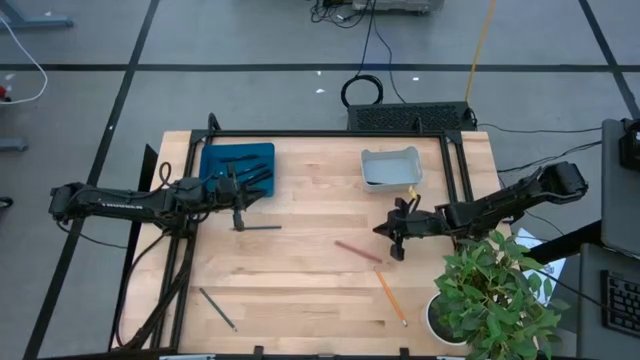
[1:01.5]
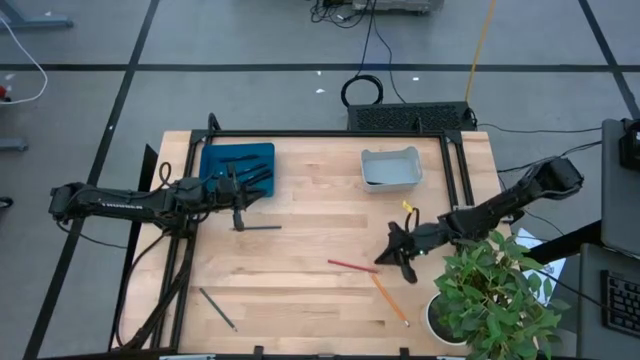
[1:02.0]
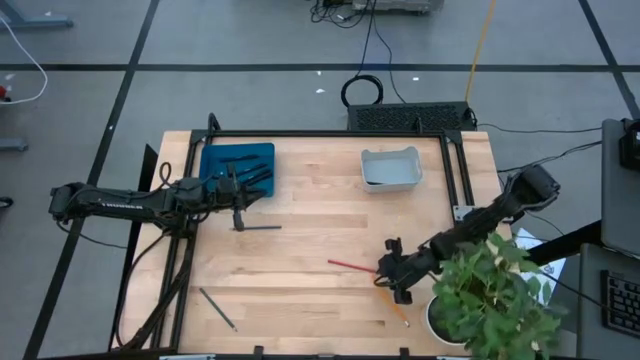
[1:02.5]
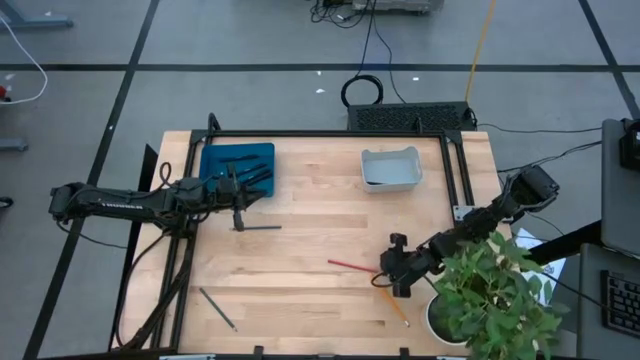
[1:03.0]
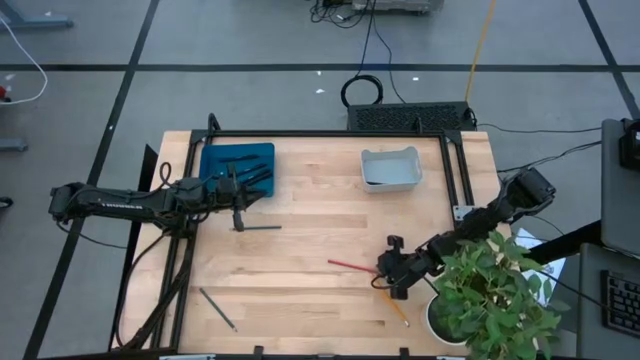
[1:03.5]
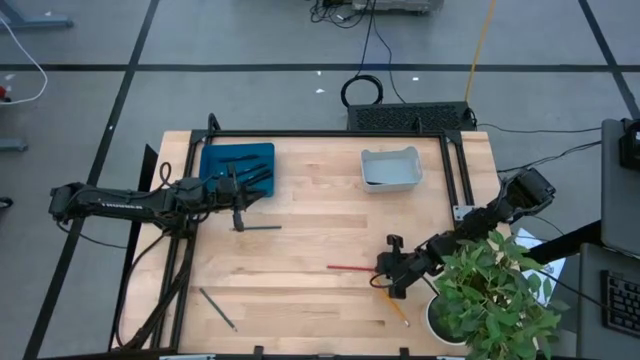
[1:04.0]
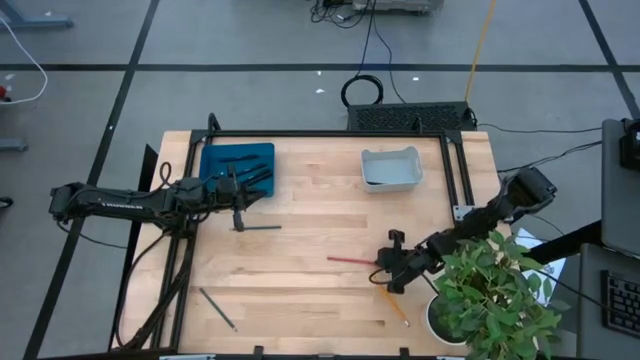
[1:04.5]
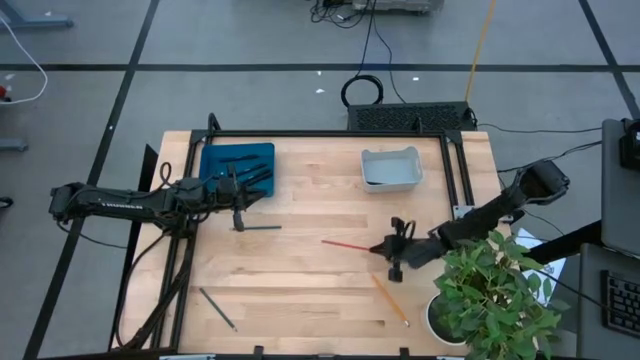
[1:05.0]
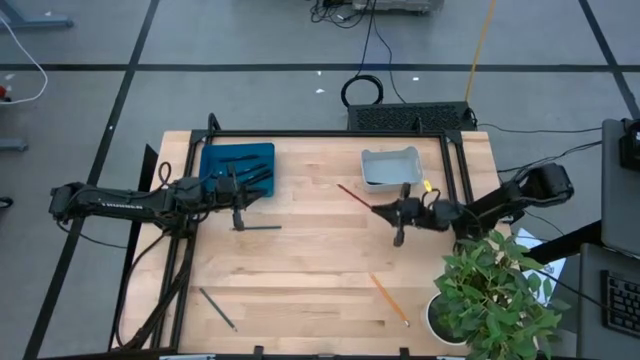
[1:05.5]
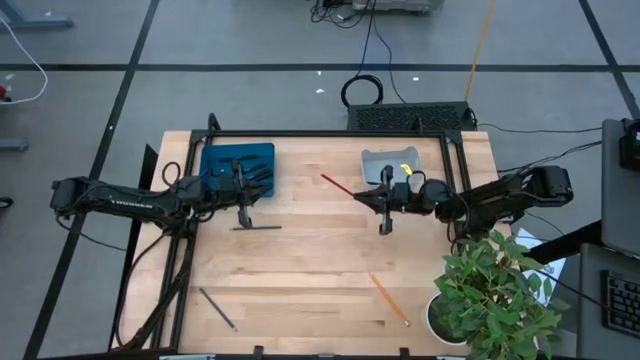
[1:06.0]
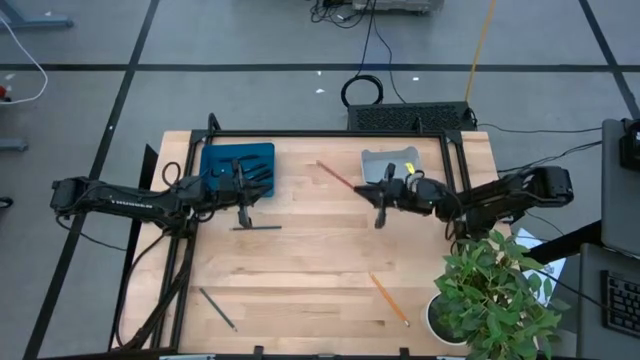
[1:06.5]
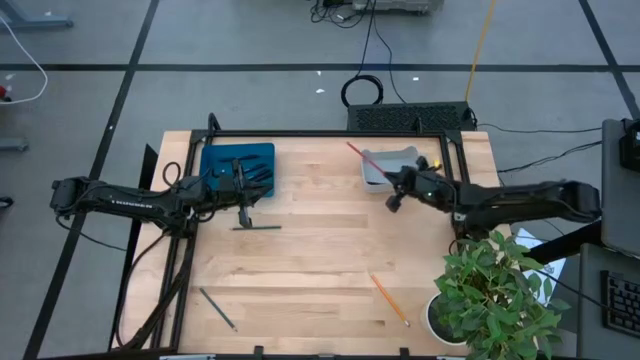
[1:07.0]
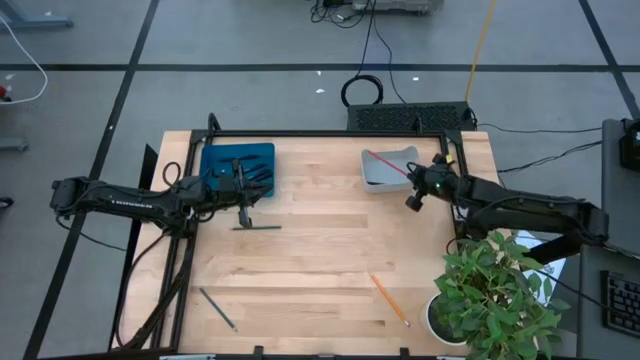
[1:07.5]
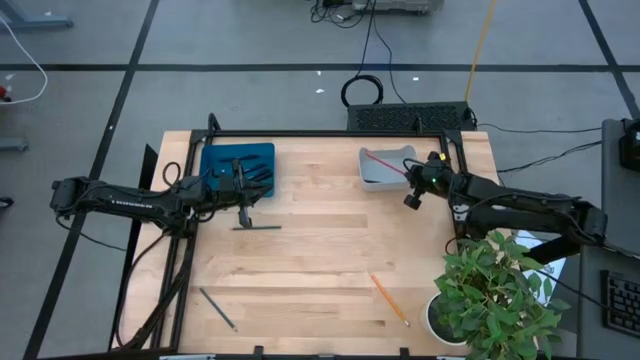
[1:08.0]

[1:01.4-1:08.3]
Task: Sort pens & pencils
Put the red pencil into the gray bin

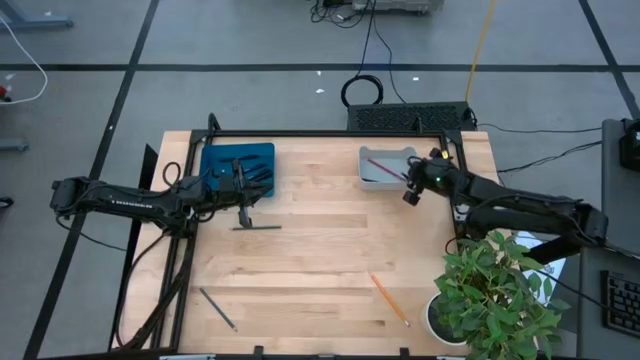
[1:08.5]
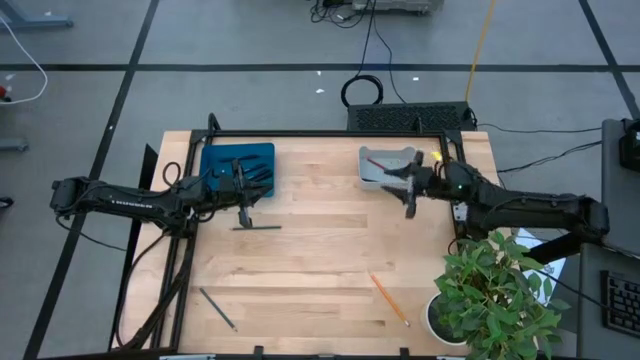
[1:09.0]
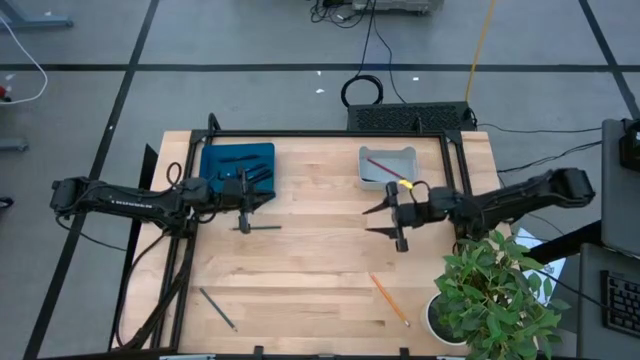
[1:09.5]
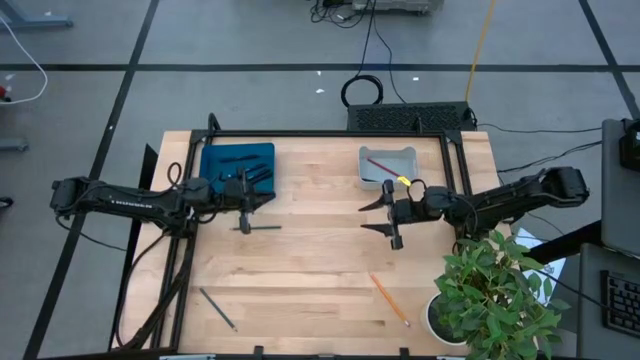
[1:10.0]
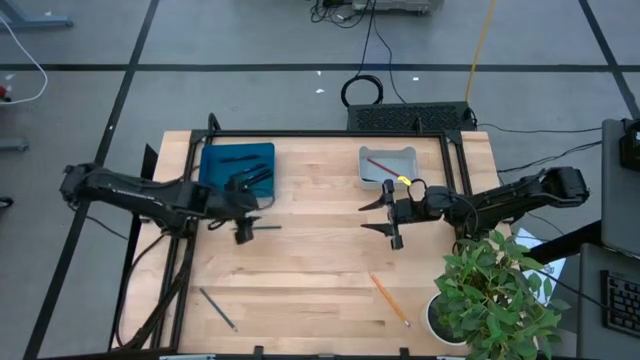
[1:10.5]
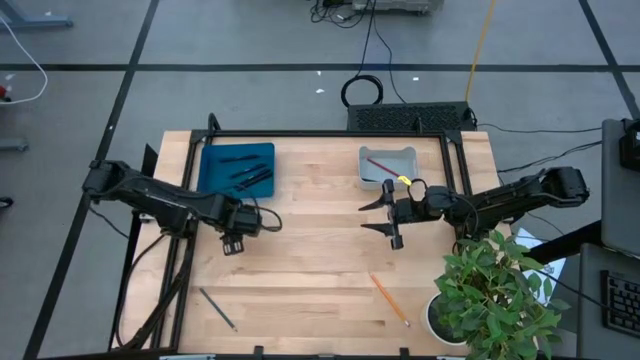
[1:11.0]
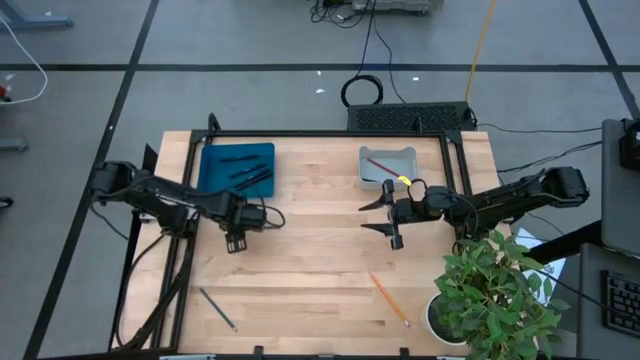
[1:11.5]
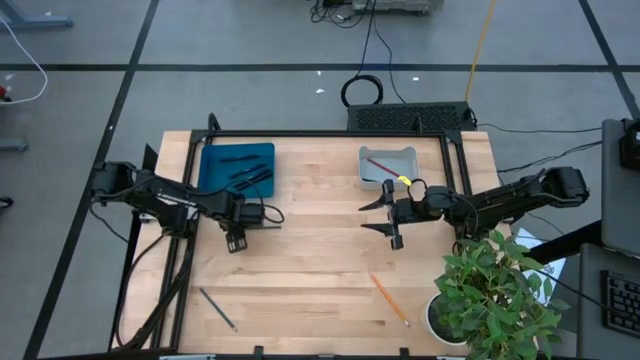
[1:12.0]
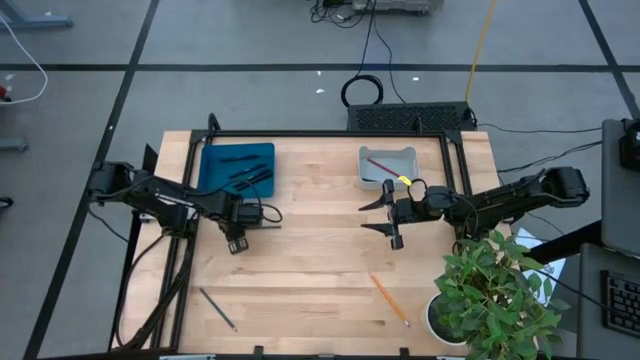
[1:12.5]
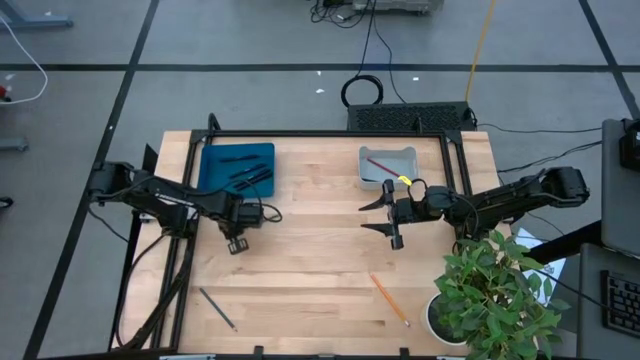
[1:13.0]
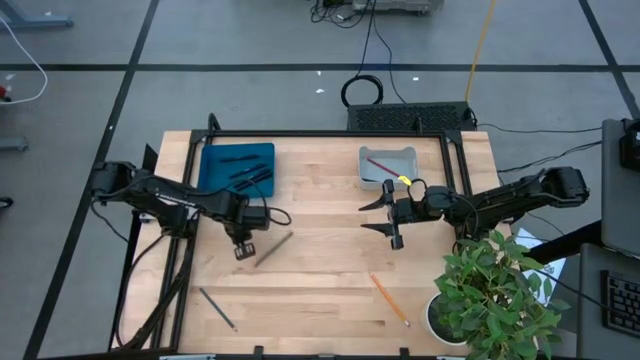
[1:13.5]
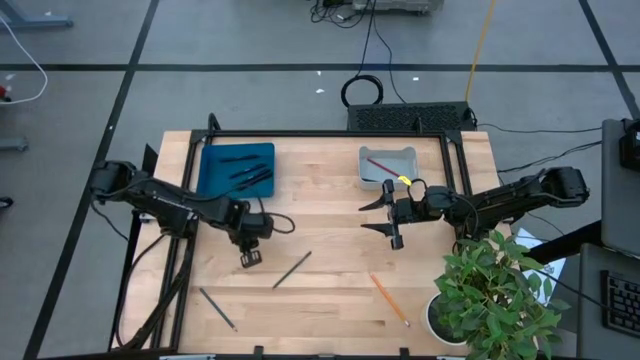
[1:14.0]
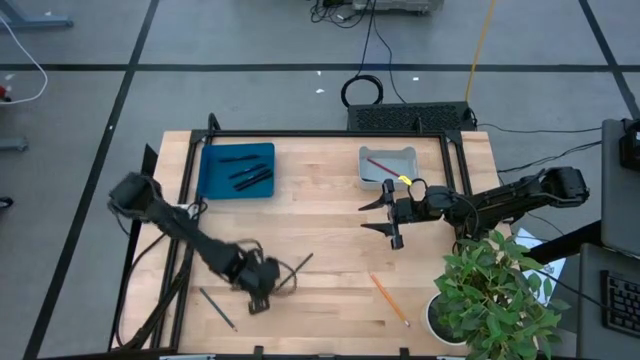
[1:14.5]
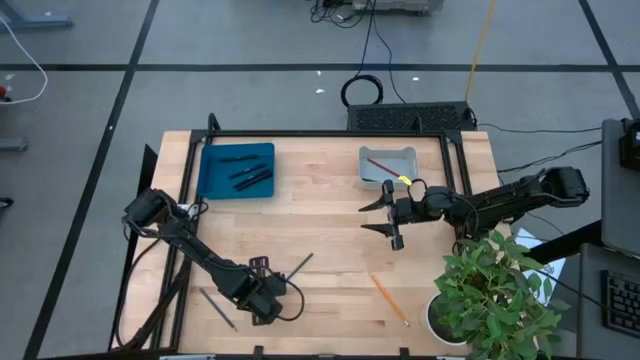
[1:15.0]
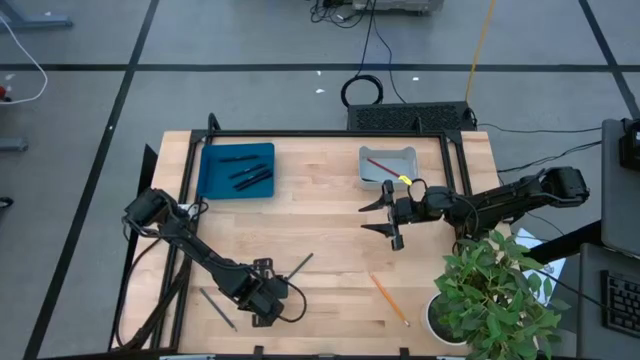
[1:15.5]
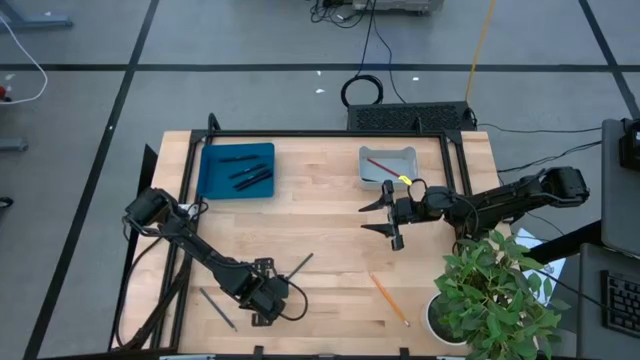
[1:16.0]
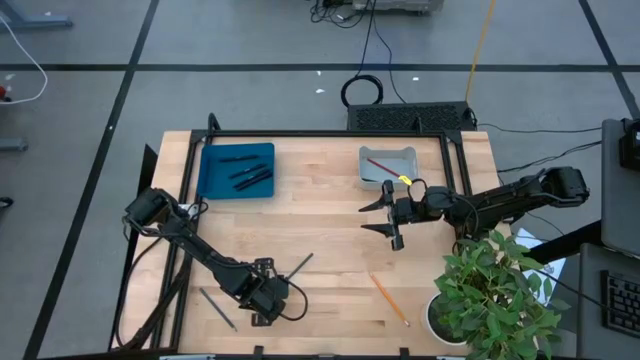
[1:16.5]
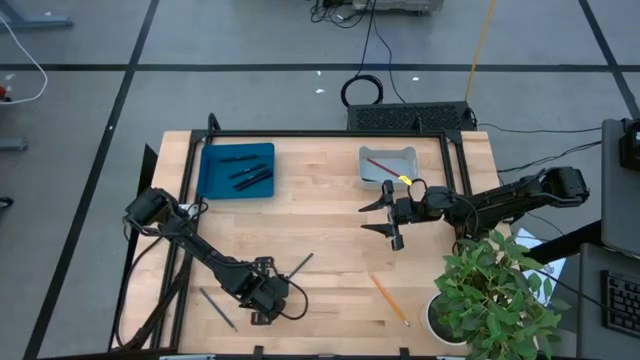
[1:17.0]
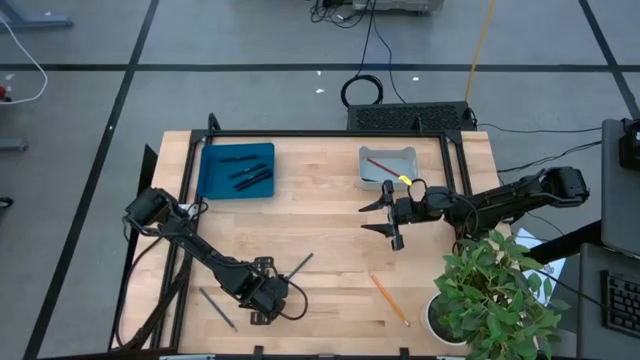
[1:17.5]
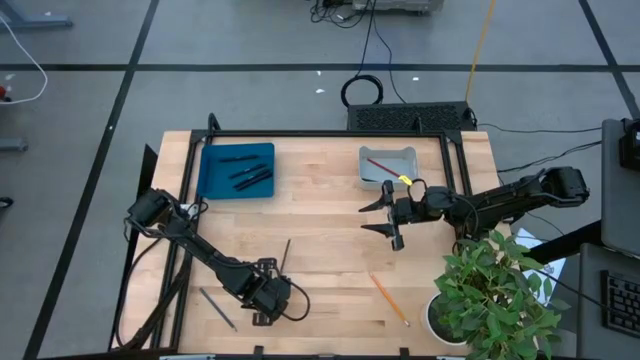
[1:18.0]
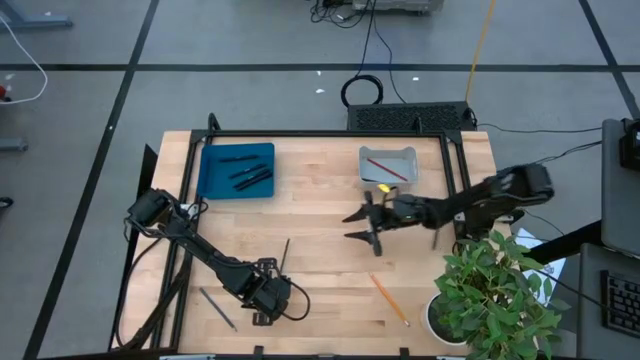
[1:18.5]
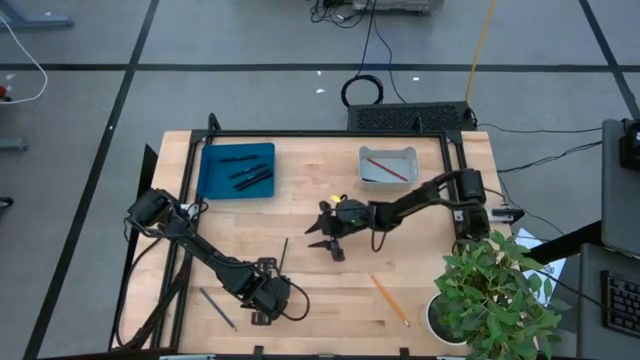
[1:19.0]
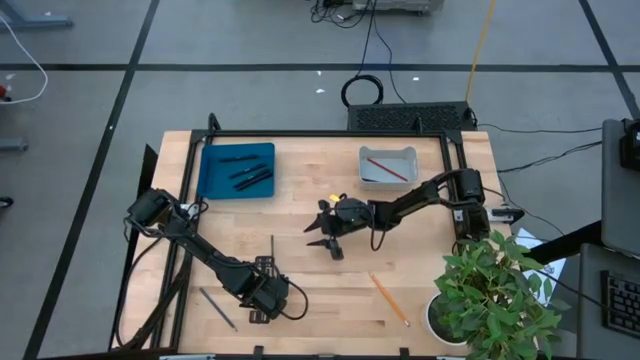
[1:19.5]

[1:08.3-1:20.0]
Put the green pencil into the gray bin

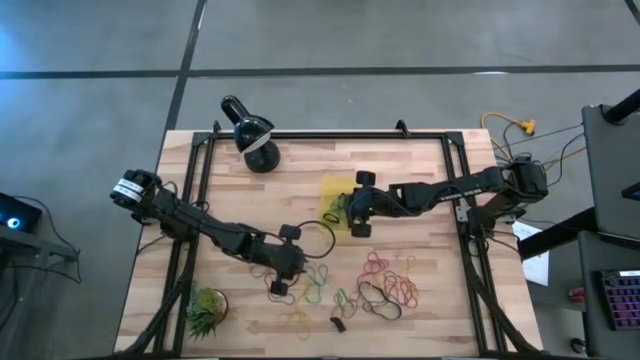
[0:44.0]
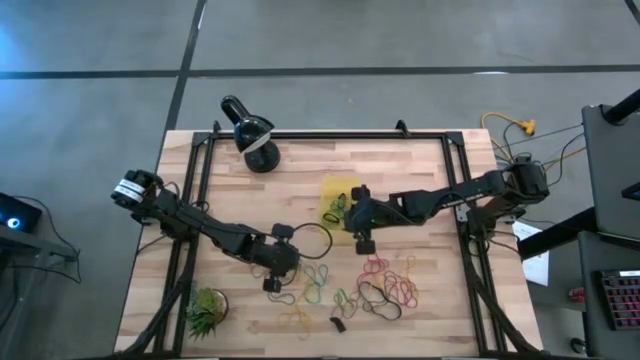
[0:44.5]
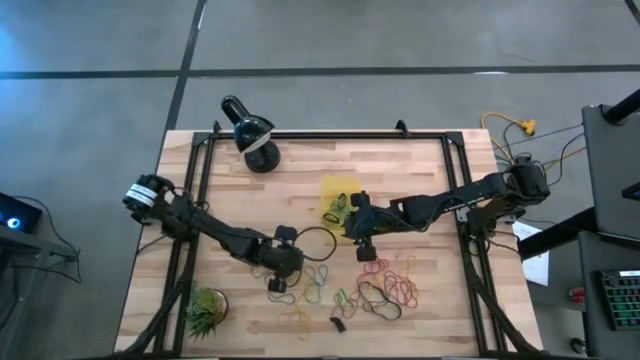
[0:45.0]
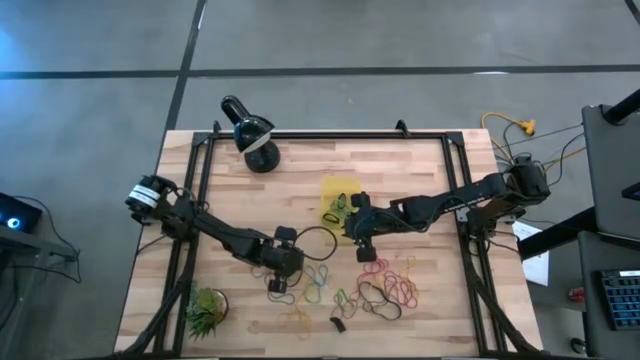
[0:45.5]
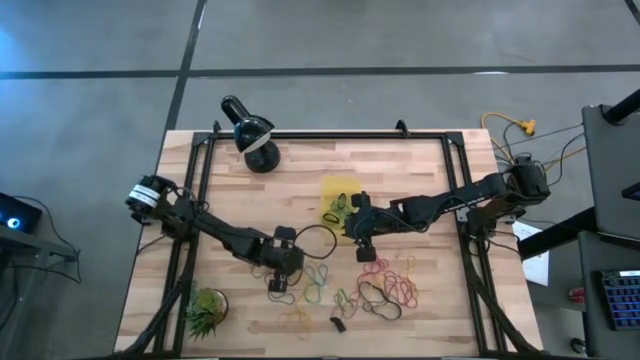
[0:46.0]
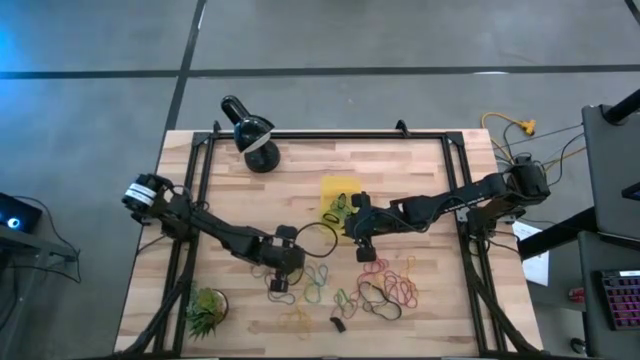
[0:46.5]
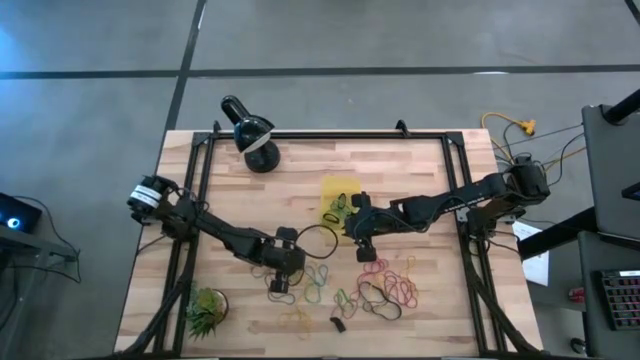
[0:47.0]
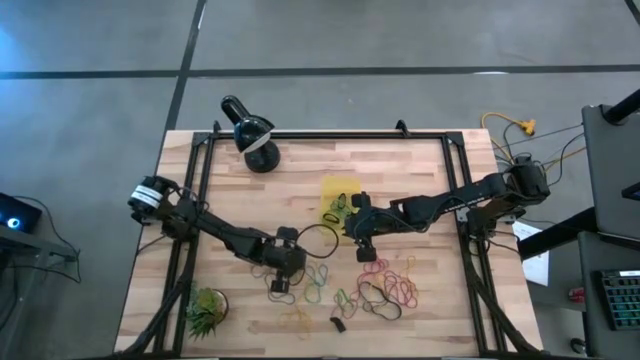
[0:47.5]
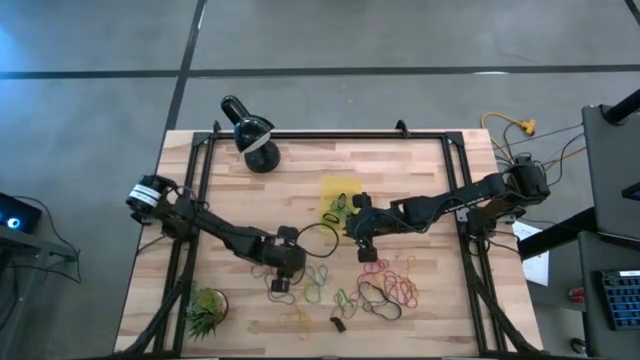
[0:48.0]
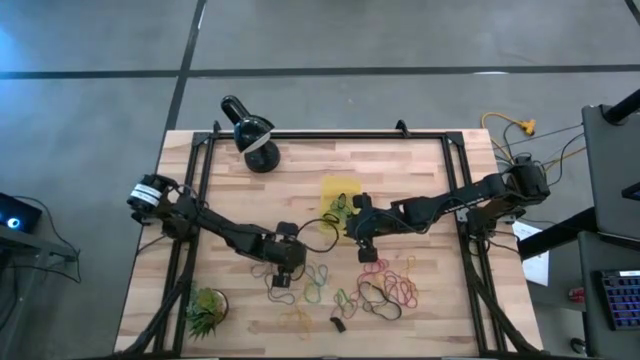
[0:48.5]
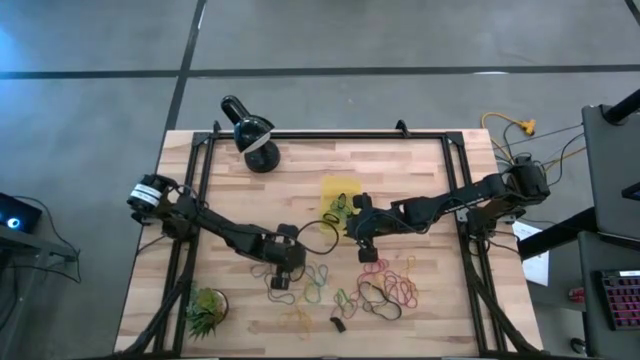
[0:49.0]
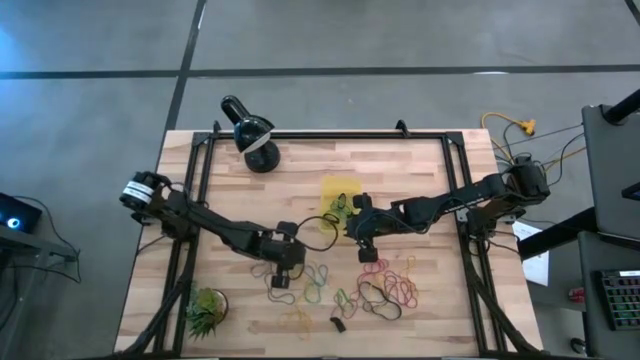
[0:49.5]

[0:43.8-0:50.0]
Task: Pick and place rubber bands into bin
Put the green rubber band into the yellow bin
